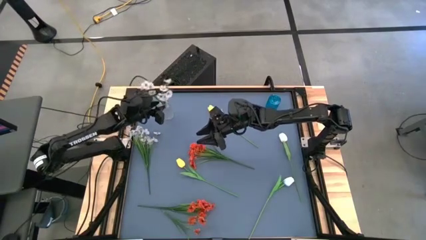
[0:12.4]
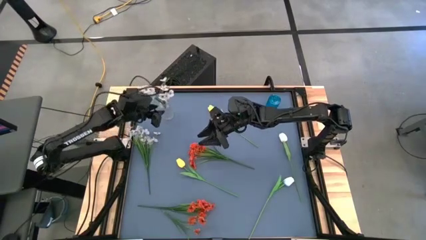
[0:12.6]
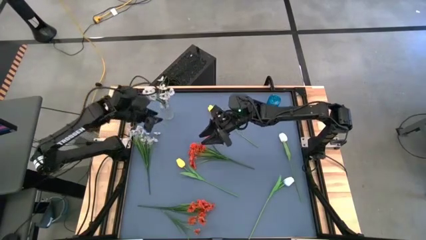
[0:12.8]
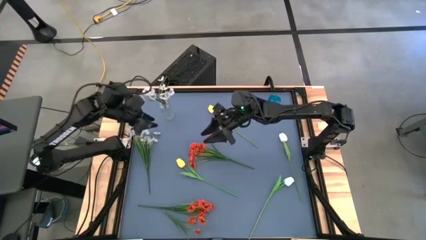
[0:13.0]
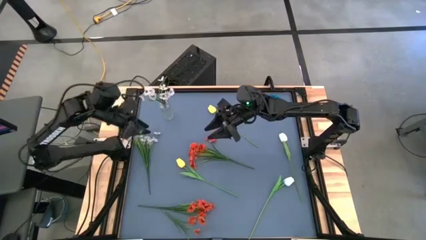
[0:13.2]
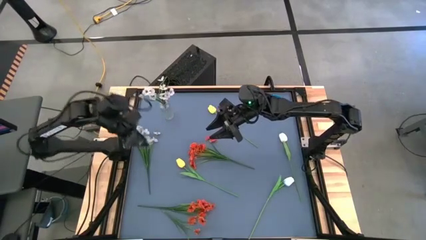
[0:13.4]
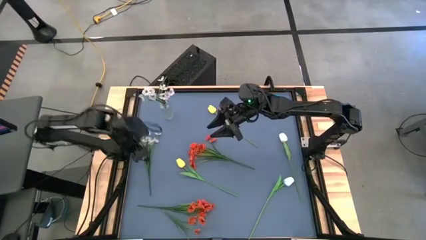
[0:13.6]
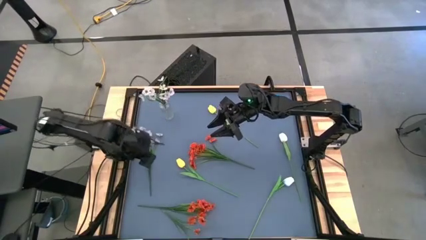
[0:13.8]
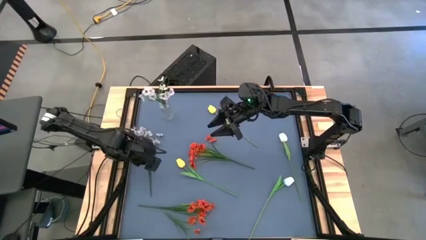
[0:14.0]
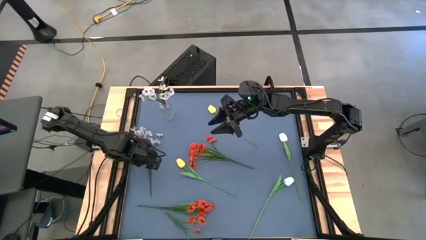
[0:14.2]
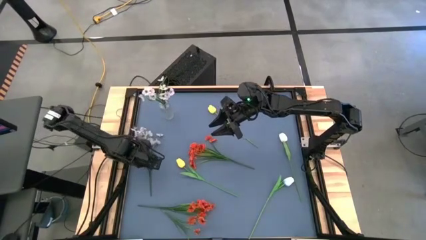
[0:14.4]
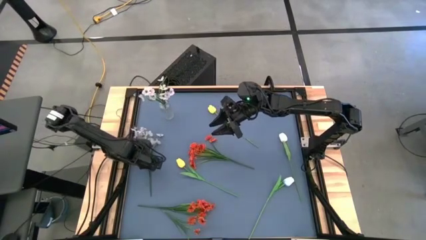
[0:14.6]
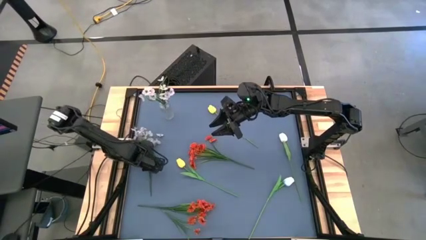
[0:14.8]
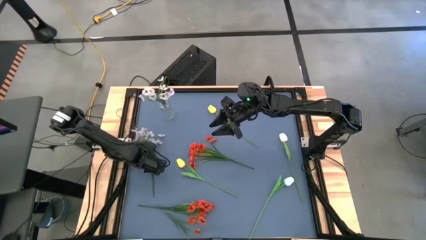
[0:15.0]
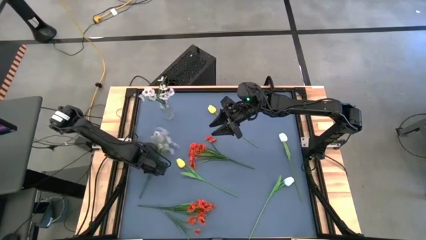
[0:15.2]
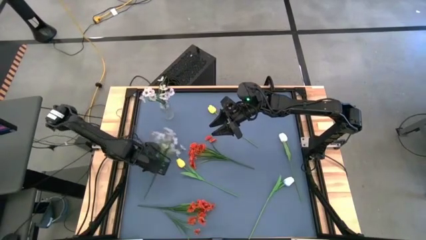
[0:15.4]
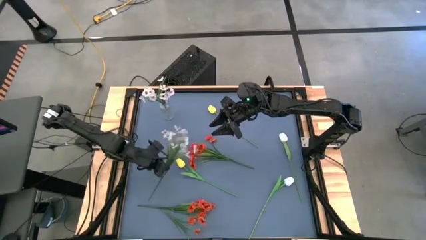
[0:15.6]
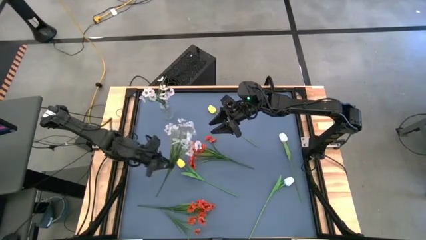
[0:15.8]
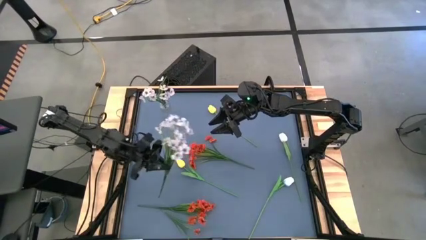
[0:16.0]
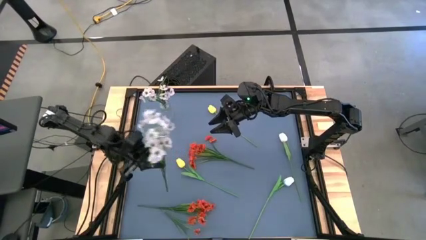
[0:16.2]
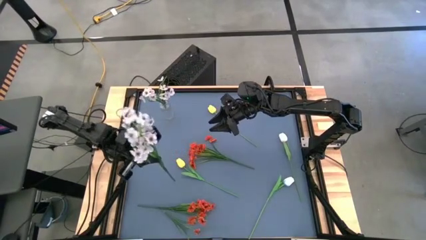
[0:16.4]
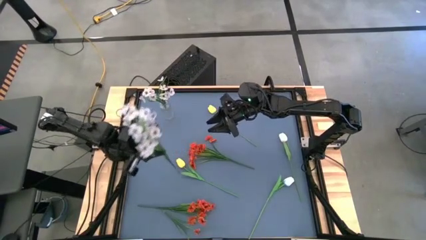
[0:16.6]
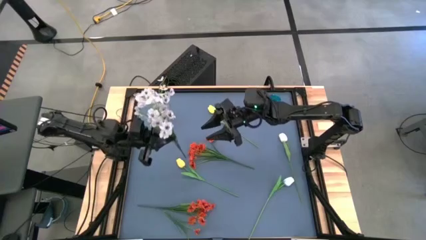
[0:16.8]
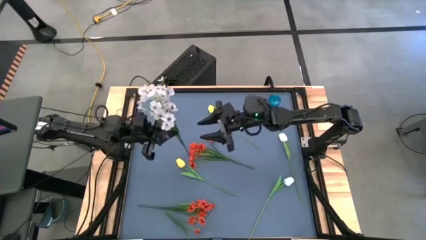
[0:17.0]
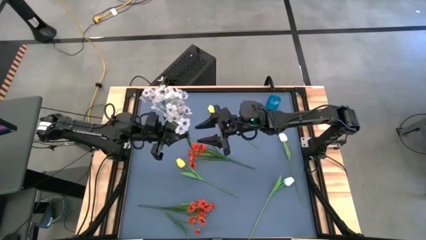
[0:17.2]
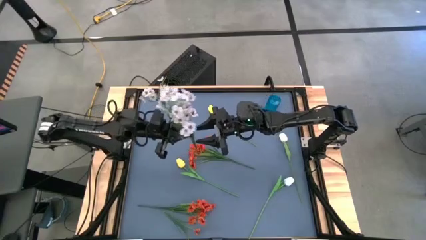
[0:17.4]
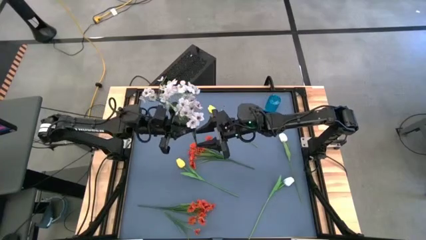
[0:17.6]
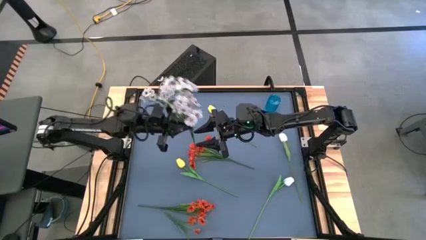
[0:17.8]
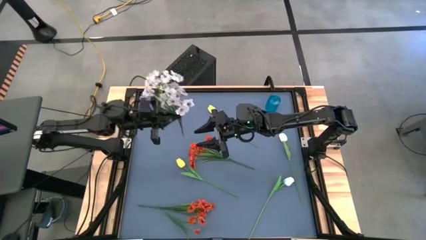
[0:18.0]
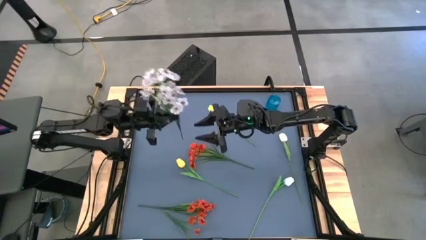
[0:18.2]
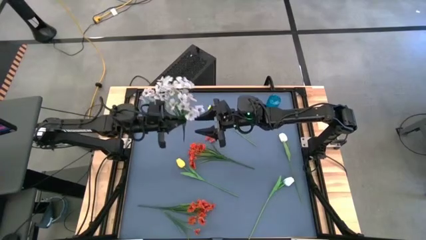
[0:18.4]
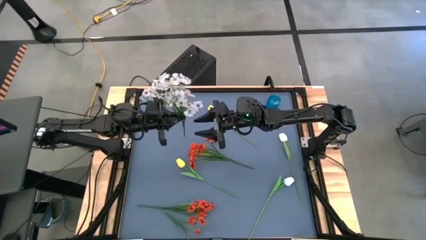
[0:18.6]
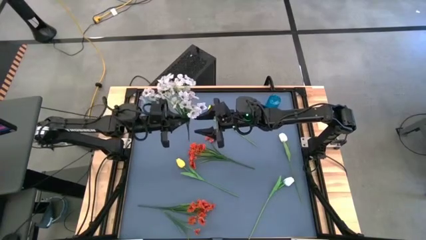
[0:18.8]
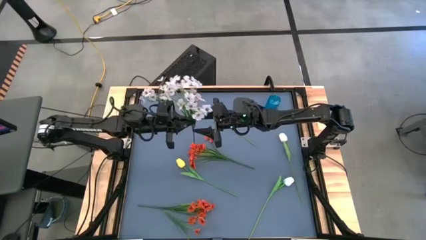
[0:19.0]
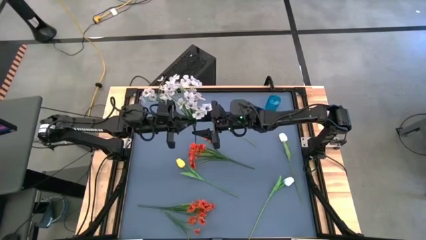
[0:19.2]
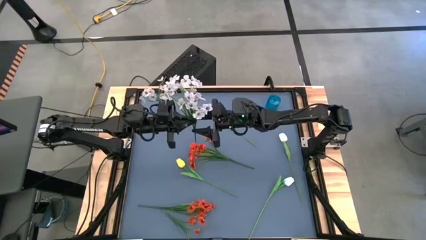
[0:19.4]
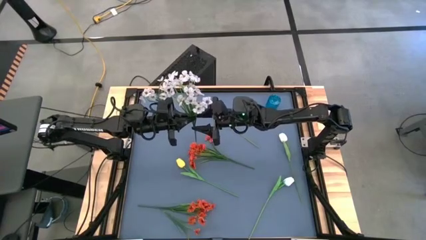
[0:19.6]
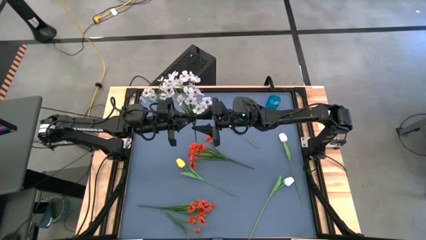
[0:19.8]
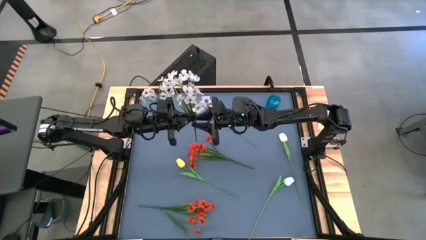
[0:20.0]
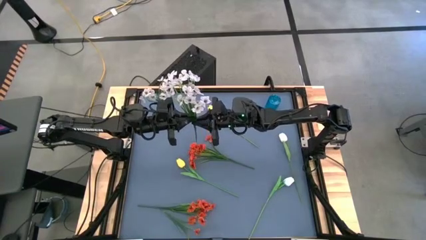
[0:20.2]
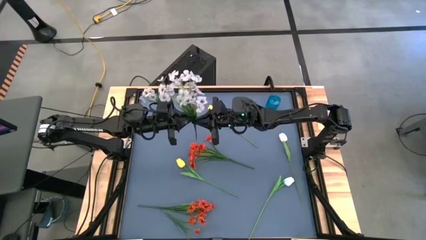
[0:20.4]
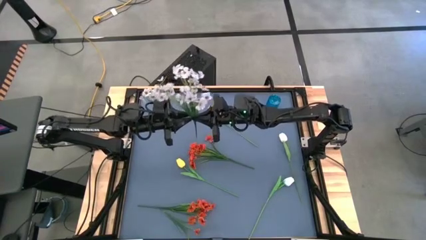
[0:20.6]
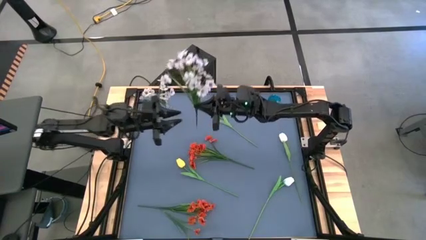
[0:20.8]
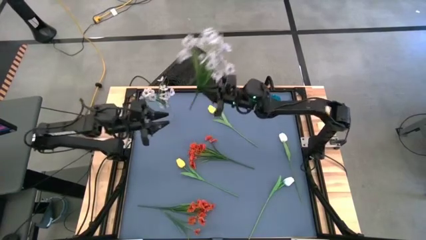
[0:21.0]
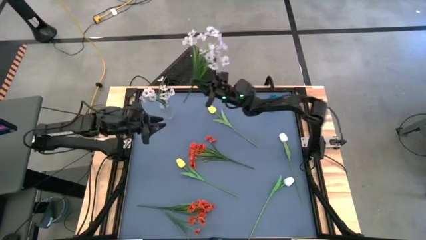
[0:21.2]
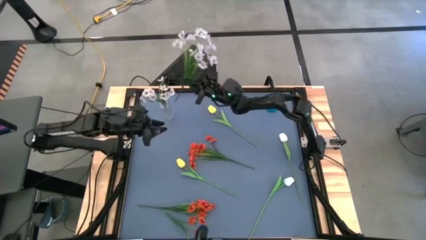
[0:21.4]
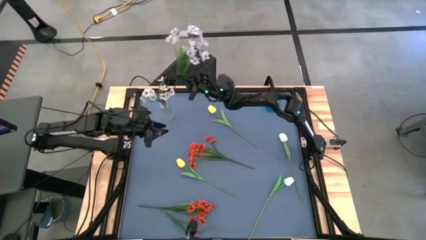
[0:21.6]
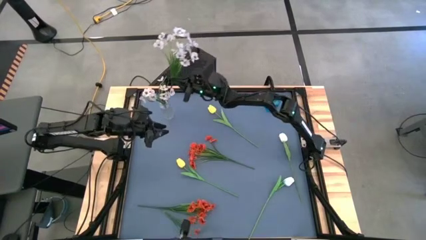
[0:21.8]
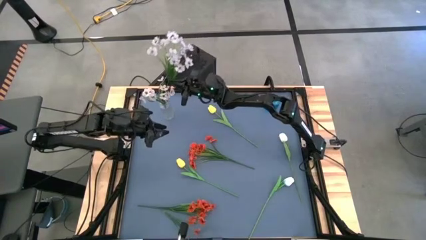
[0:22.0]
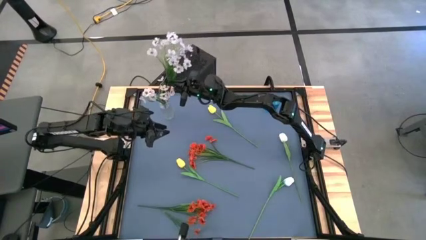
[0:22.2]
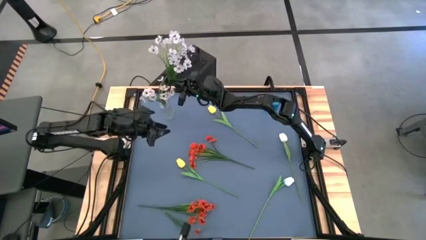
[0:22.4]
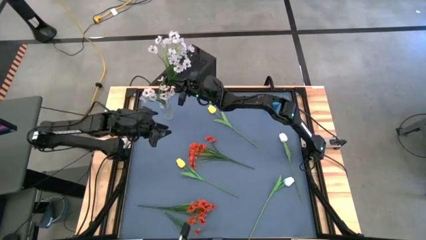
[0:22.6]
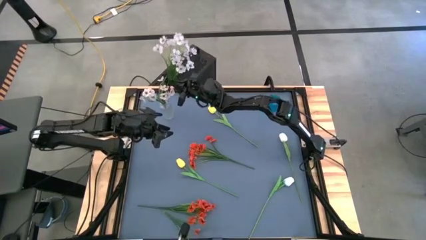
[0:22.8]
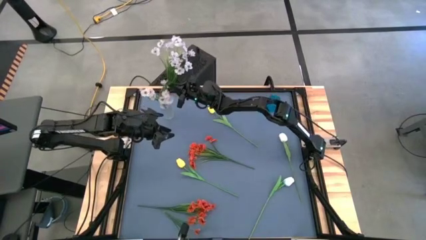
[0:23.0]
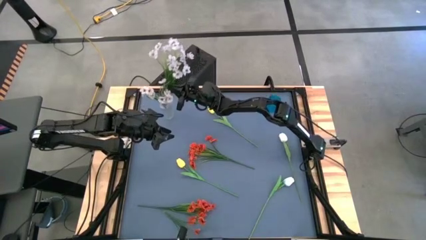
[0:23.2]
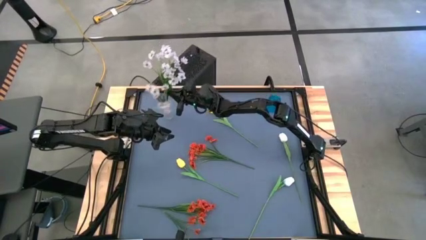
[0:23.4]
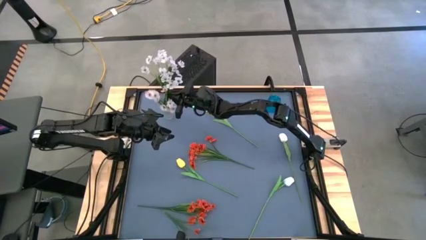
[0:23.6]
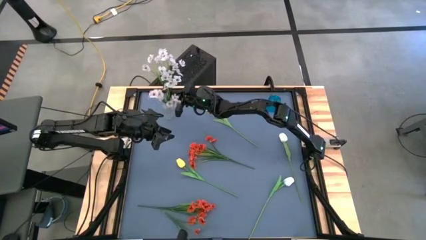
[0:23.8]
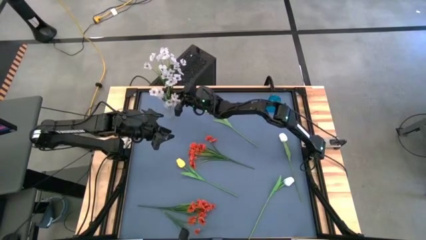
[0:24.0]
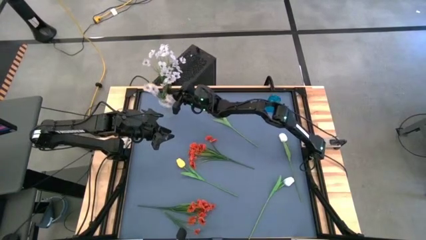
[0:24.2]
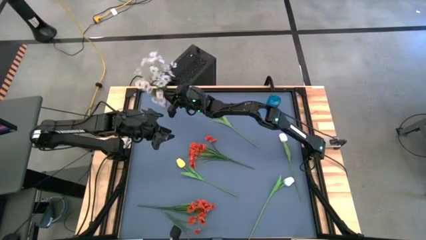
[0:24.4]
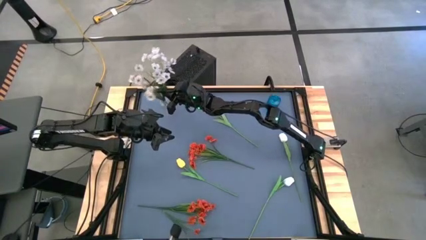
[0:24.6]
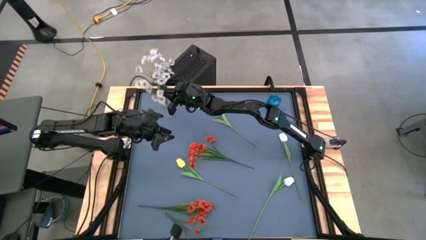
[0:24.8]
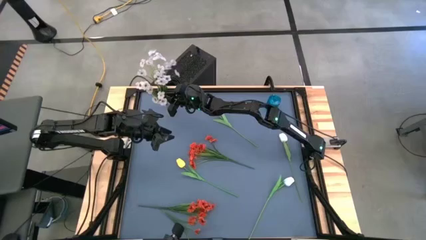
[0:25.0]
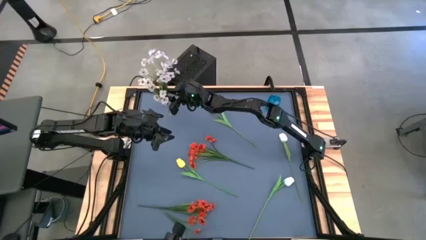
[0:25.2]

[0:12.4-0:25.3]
Task: Sort flowers into vase by color
Put the white flowers into the transparent vase

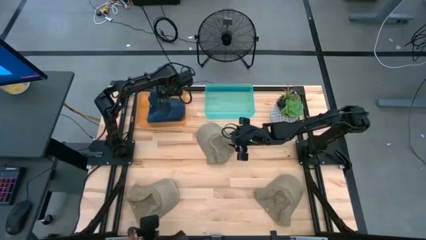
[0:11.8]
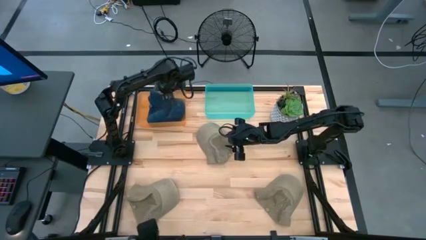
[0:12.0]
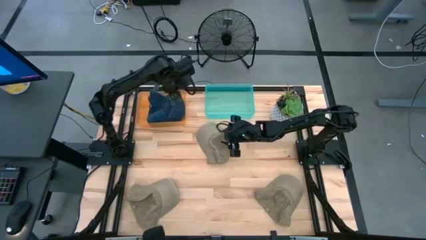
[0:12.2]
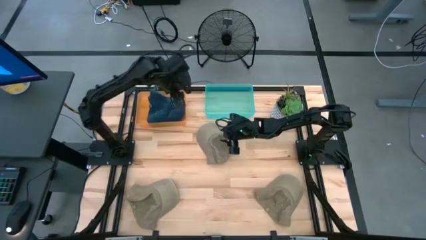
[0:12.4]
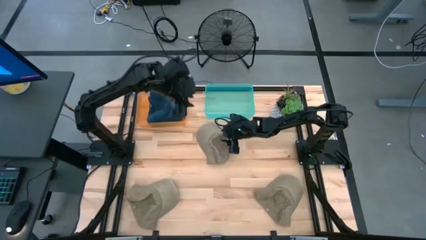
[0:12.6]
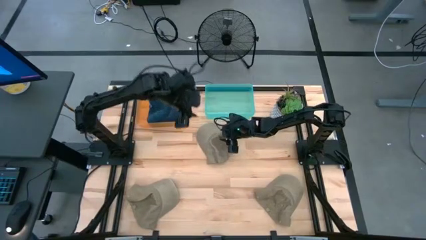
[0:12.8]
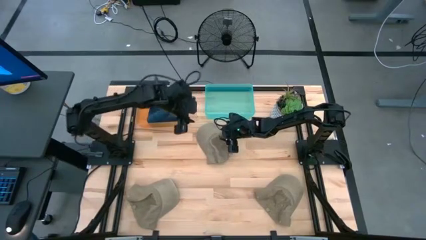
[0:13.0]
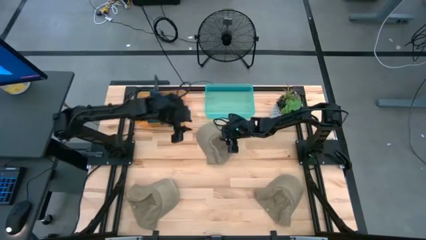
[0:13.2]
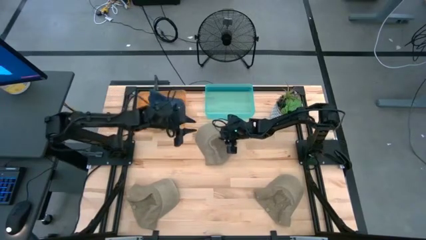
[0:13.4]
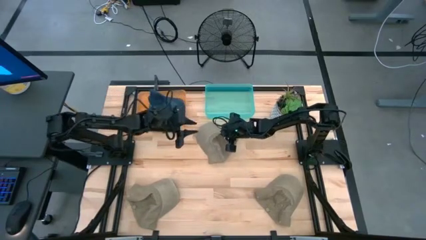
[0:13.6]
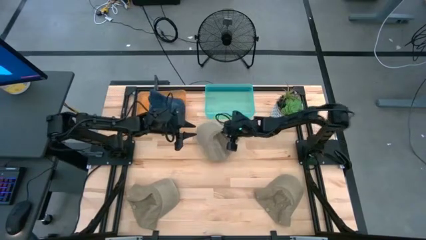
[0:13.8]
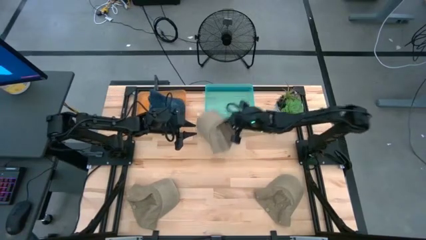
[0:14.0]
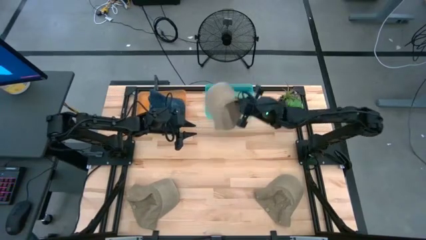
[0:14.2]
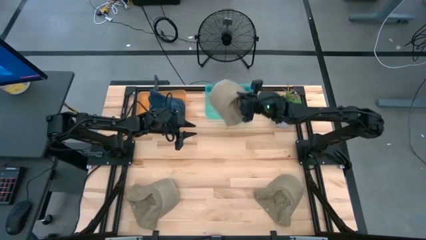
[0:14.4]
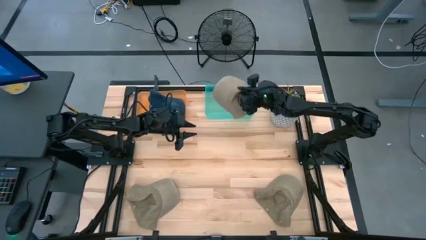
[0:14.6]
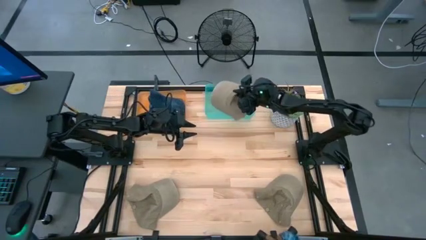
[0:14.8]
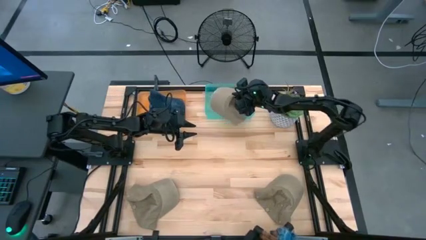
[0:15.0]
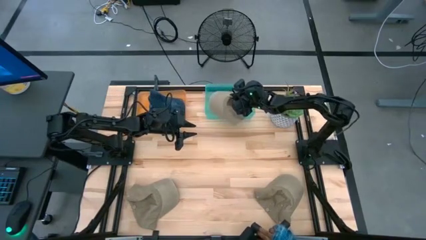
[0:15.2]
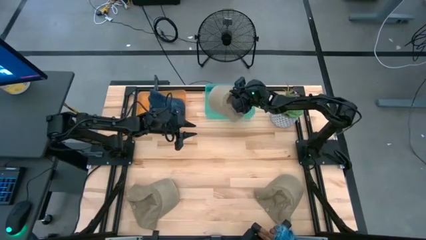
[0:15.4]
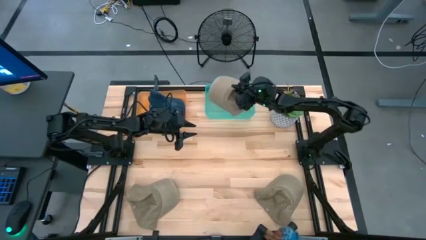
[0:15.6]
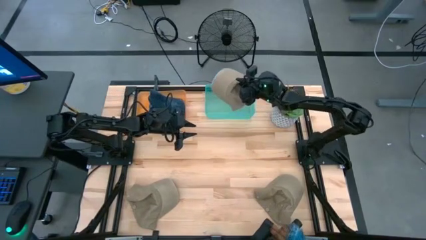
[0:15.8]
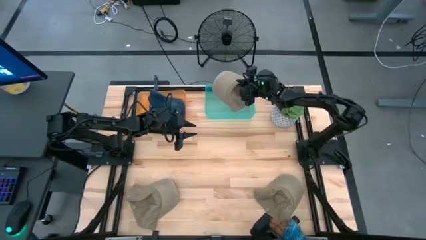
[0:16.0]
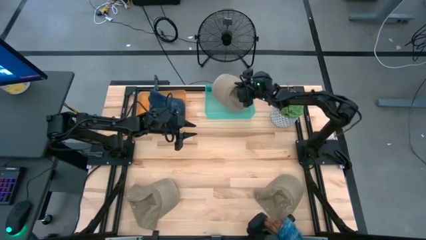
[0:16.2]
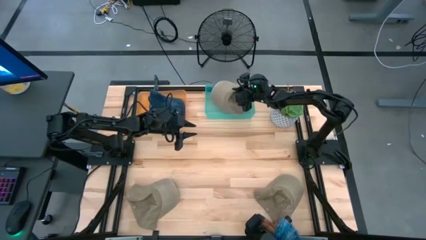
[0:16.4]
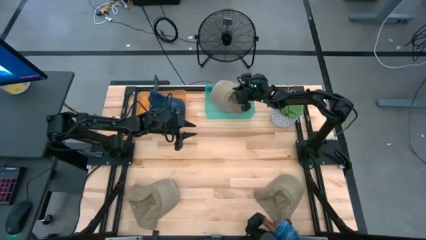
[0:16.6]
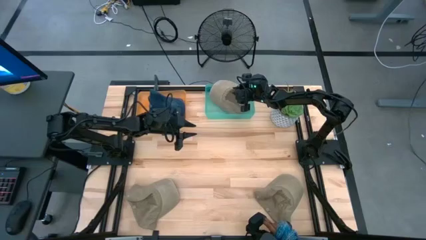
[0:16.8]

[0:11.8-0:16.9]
Task: Pick & Place hat
Put the top brown cap into the green bin
